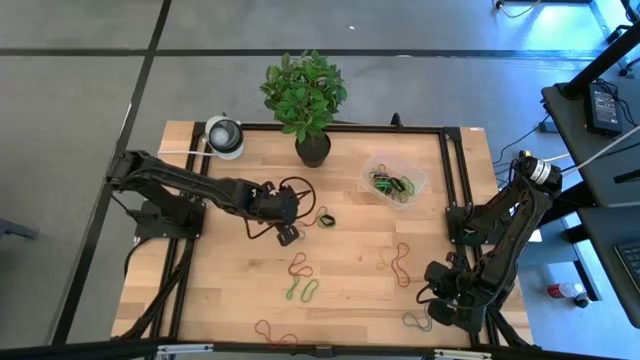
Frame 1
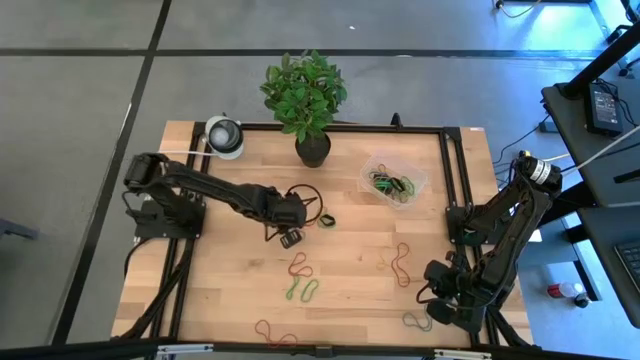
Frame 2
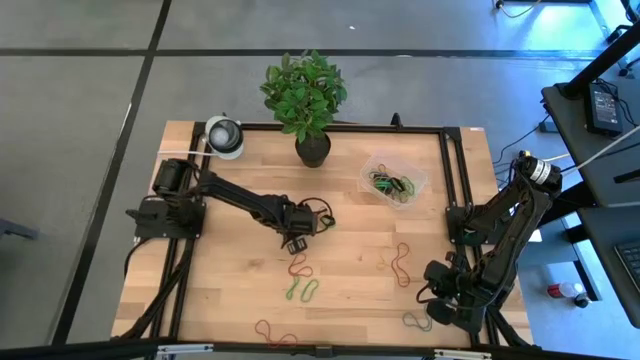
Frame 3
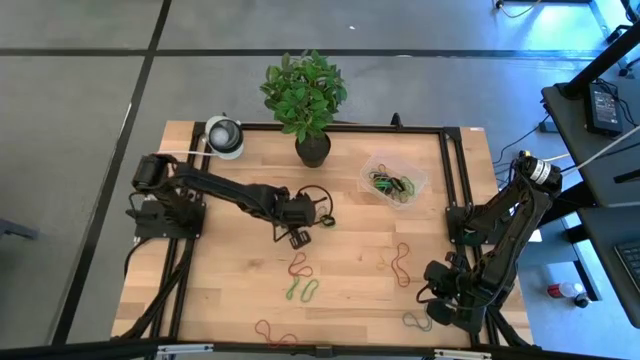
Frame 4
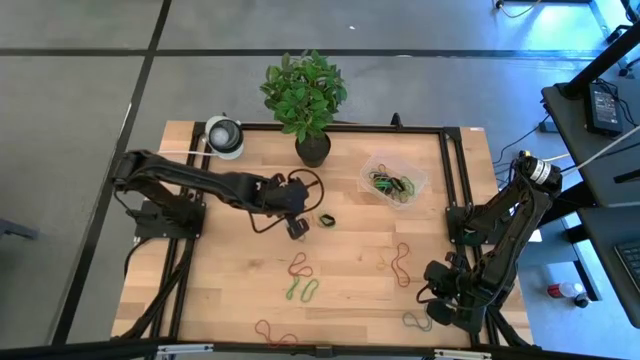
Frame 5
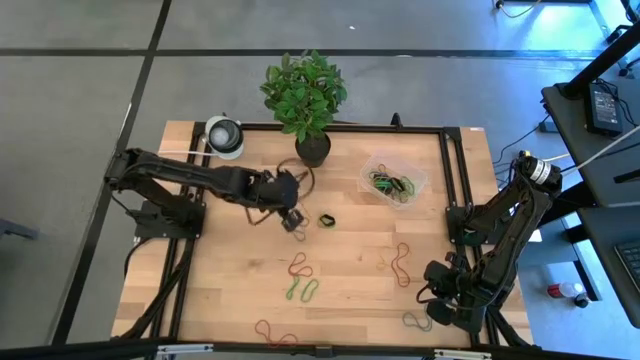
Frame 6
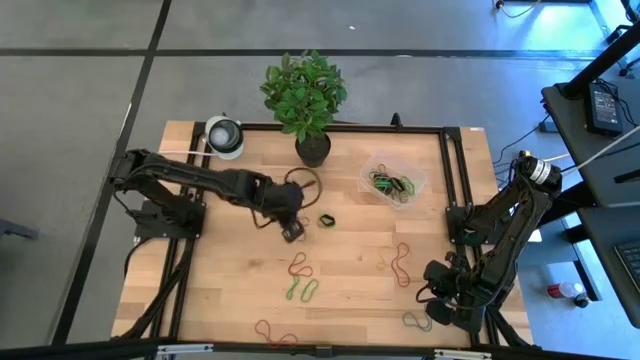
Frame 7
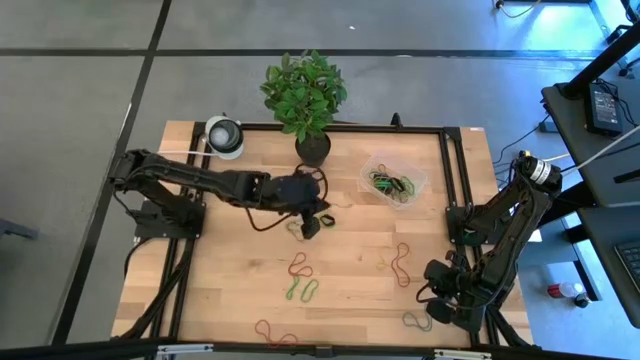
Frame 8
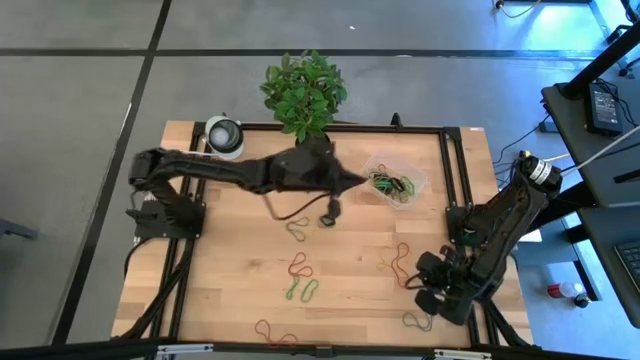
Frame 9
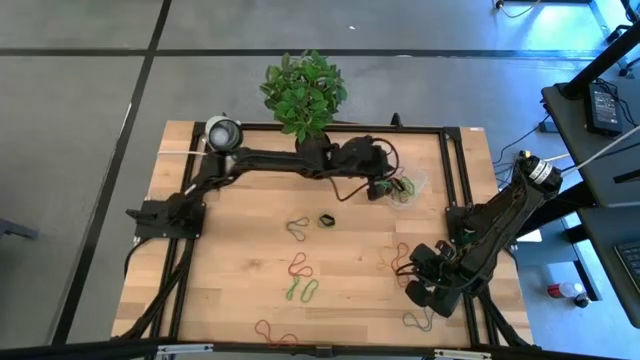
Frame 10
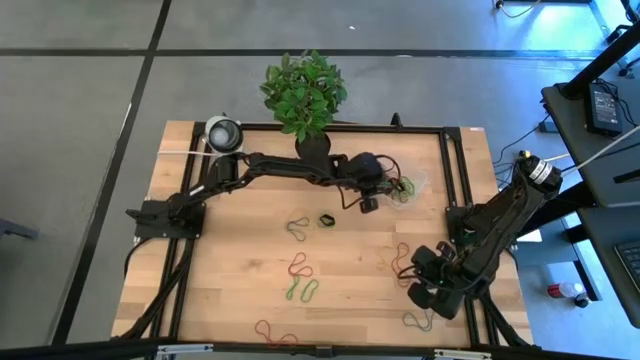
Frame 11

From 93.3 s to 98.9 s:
Task: Pick and place rubber bands into bin
Put the red rubber band into the bin

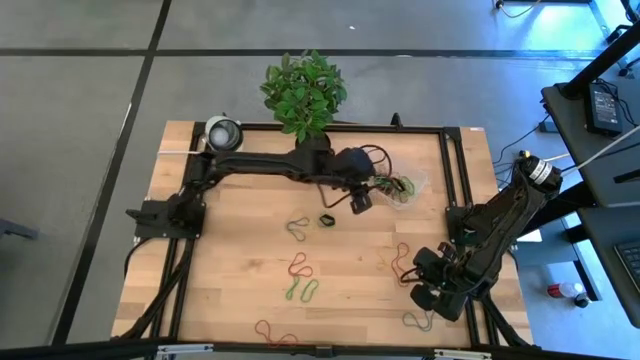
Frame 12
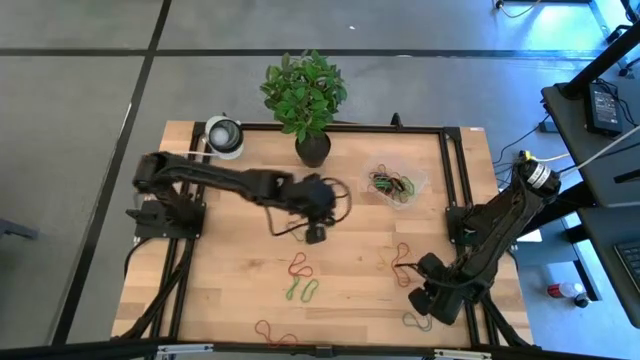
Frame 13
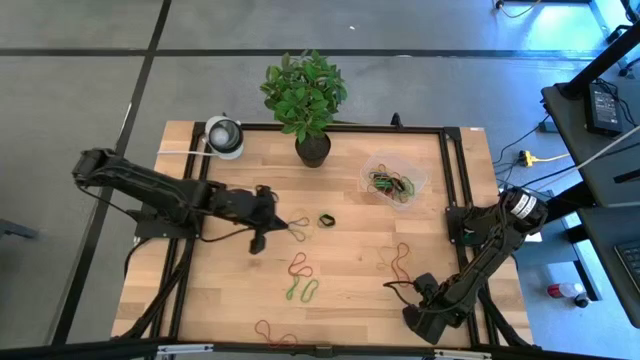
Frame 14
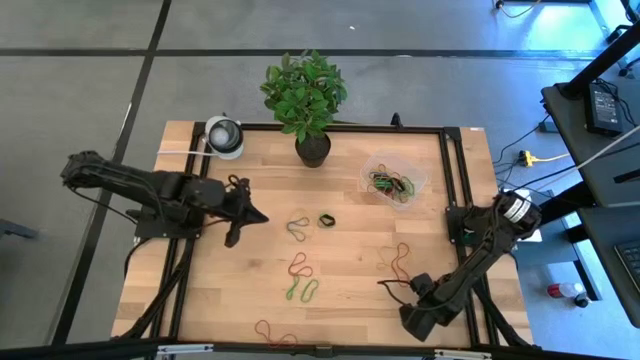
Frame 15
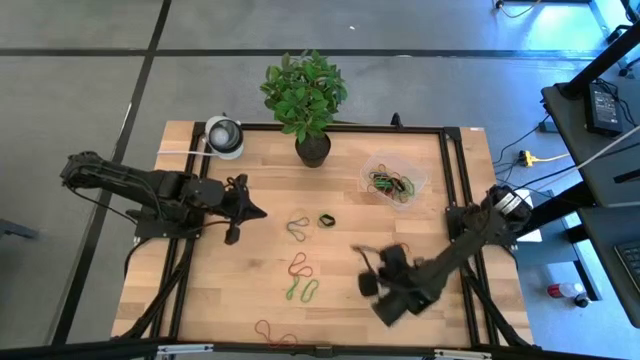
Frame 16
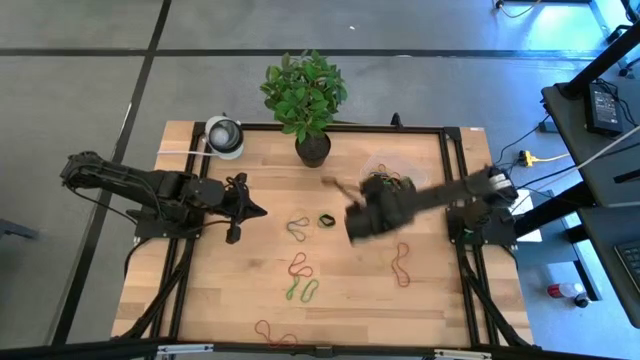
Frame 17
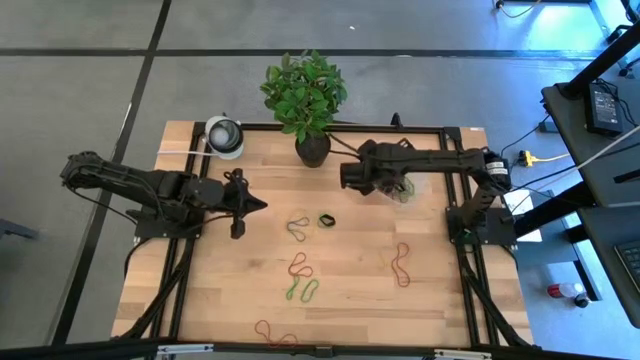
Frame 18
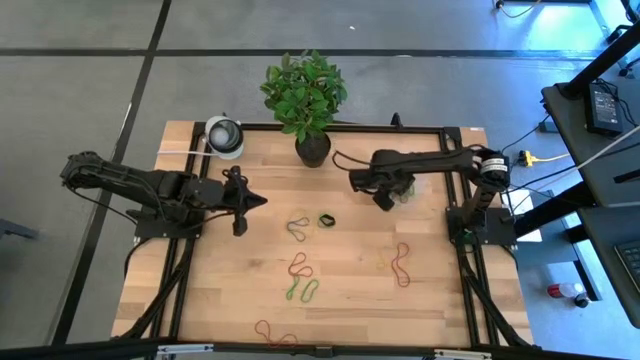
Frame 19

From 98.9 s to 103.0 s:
Put the bottom blue rubber band into the bin

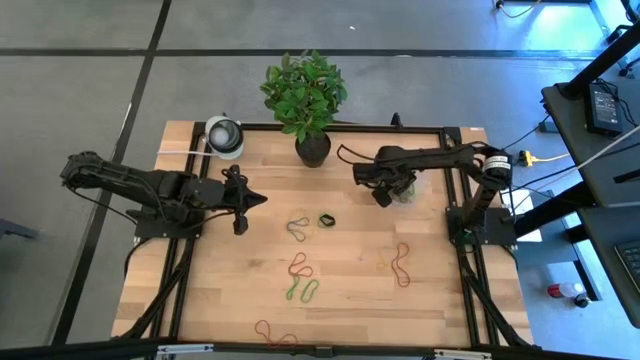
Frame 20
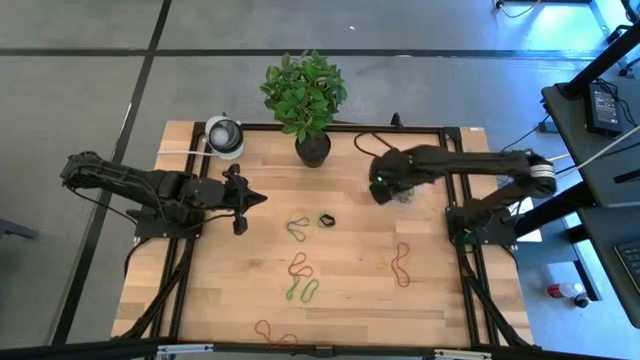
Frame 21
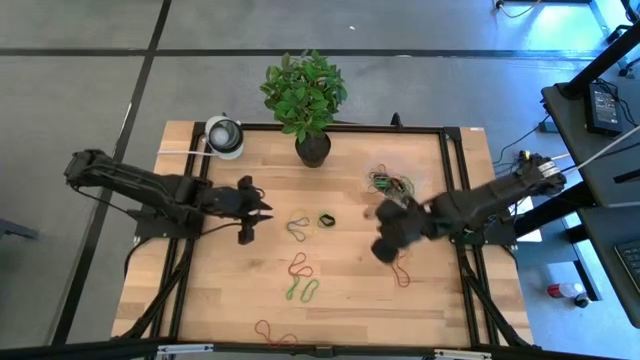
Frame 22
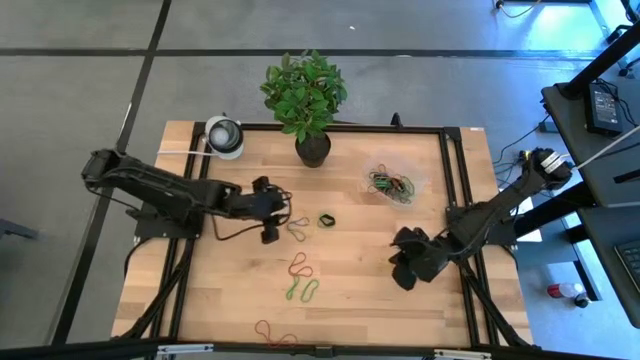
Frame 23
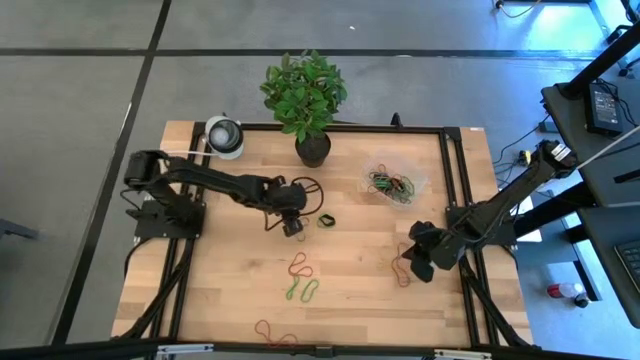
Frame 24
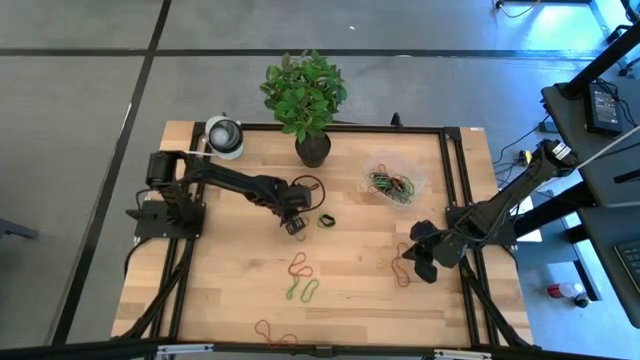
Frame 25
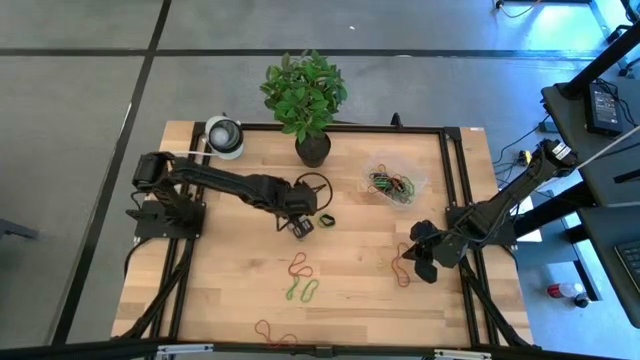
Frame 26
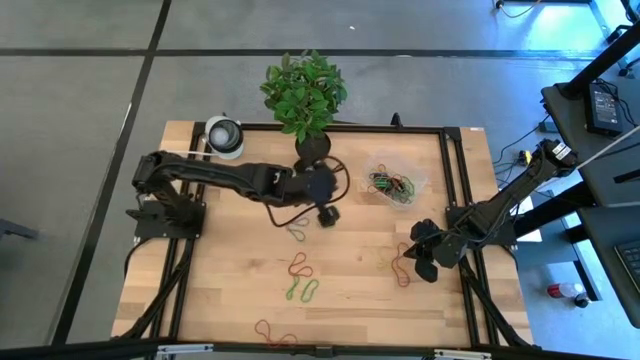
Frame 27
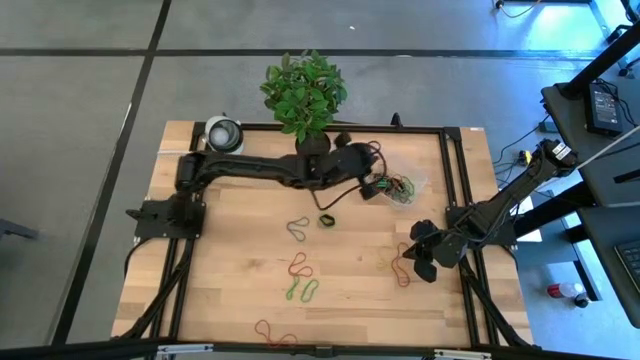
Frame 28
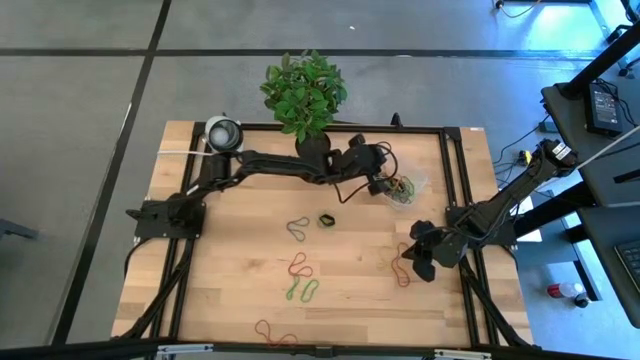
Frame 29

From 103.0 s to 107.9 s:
Put the top yellow rubber band into the bin

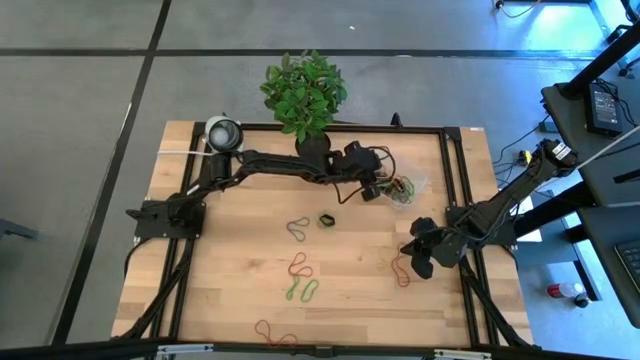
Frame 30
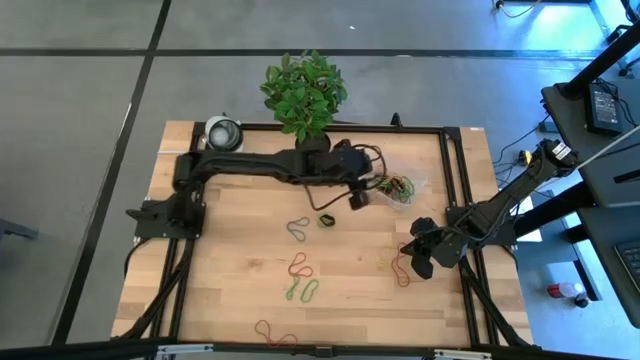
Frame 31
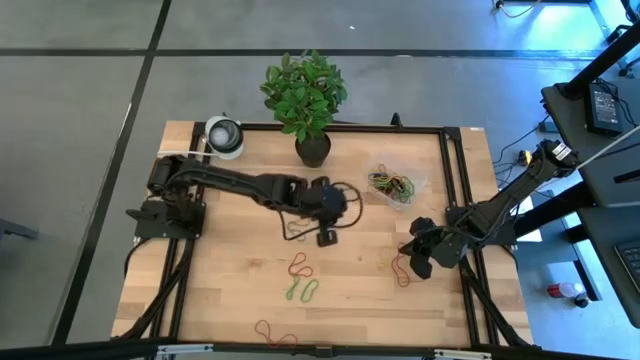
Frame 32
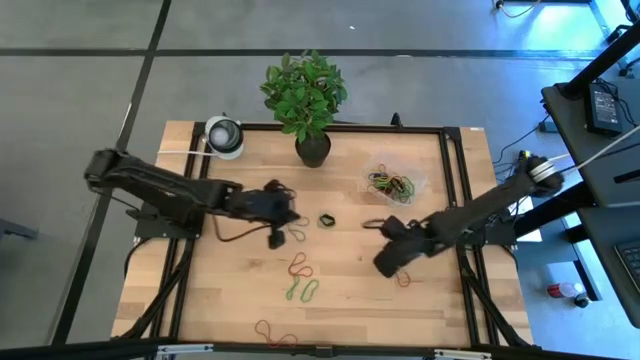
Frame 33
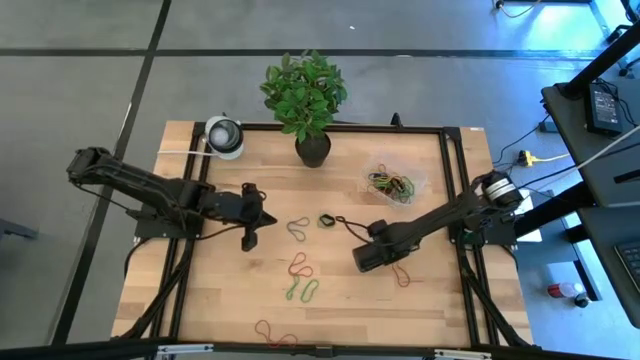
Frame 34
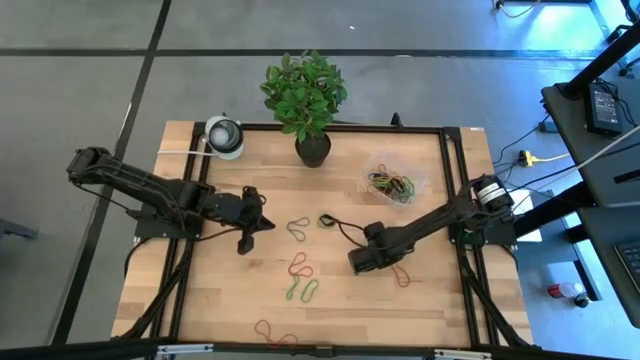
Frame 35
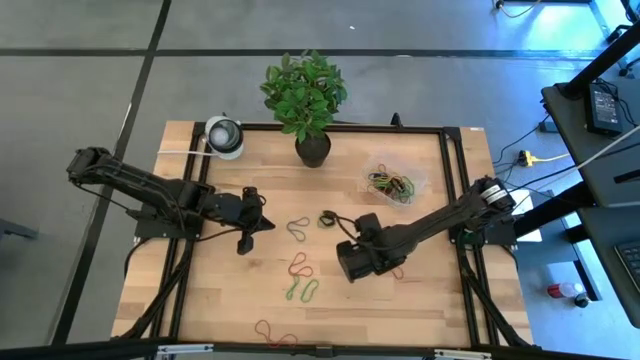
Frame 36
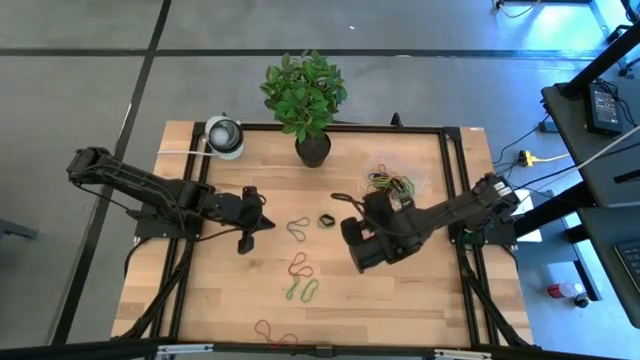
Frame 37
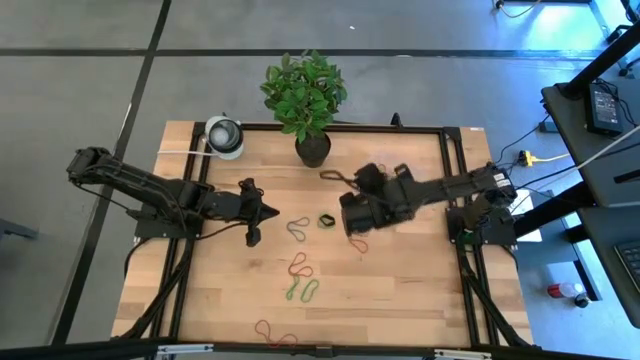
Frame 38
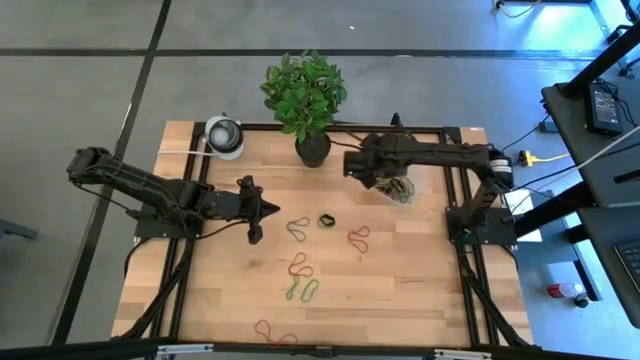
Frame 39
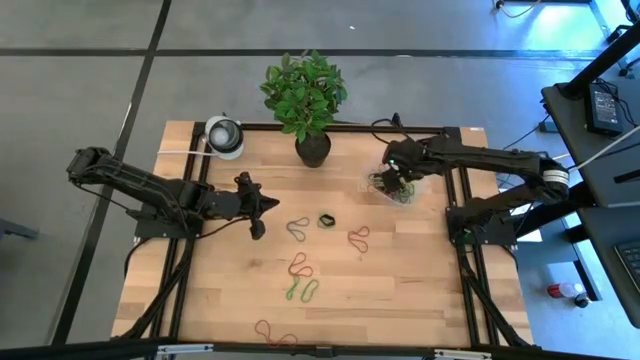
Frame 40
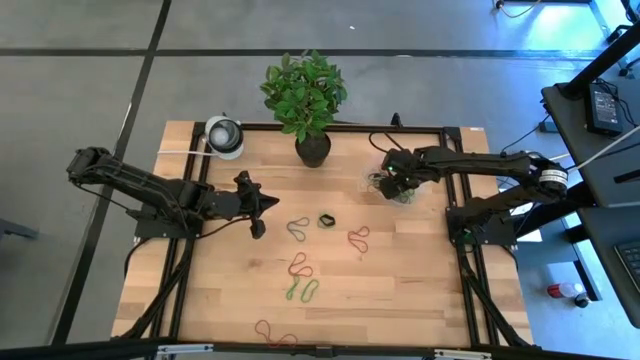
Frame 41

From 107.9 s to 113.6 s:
Put the yellow rubber band into the bin
